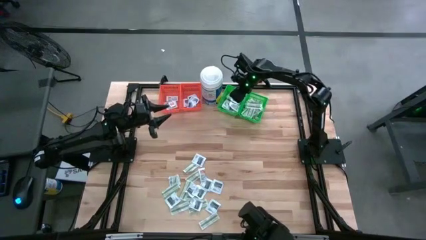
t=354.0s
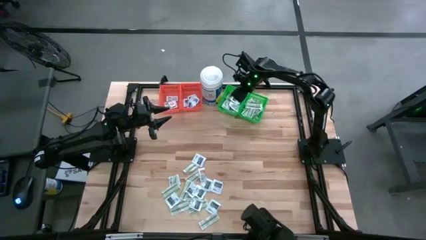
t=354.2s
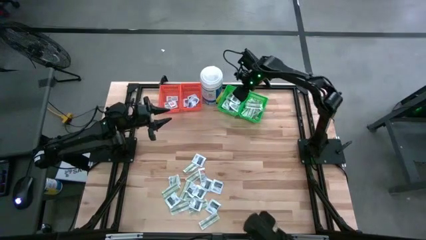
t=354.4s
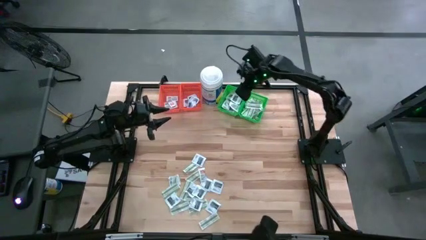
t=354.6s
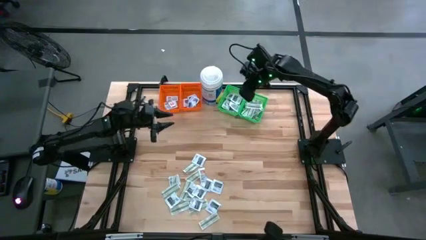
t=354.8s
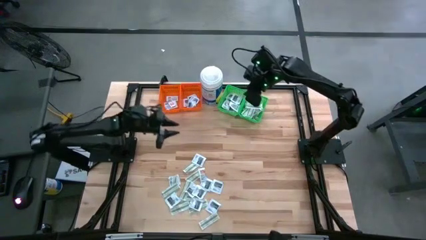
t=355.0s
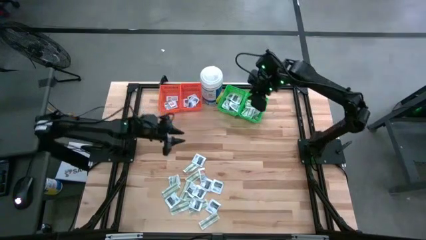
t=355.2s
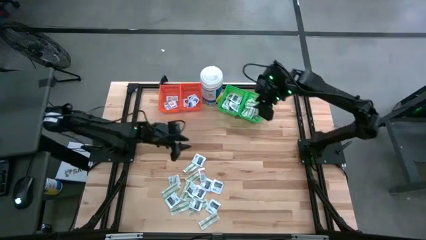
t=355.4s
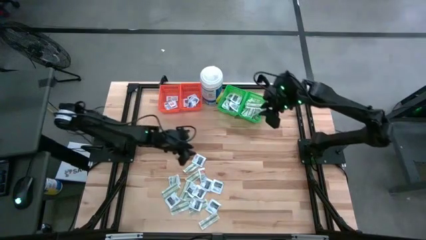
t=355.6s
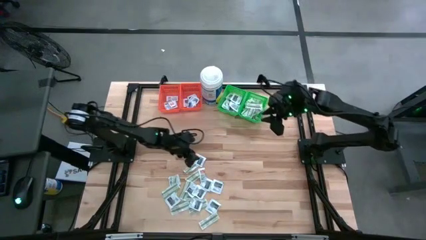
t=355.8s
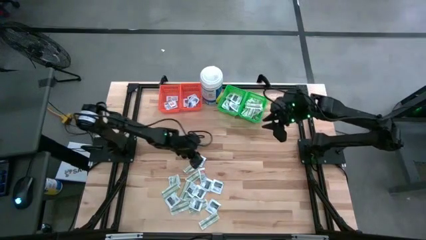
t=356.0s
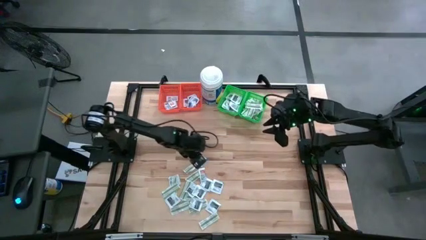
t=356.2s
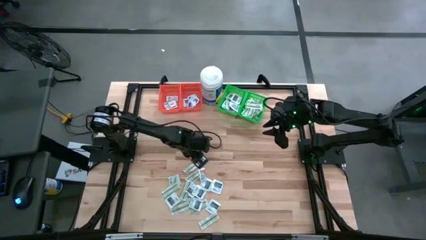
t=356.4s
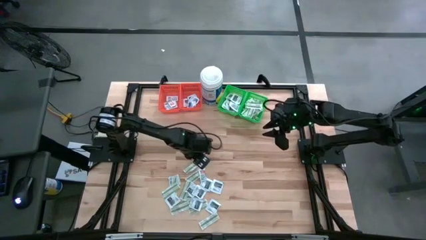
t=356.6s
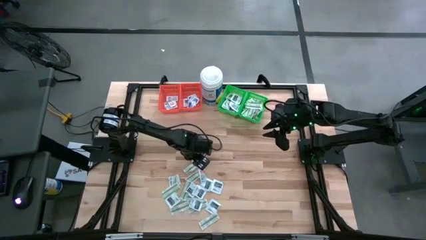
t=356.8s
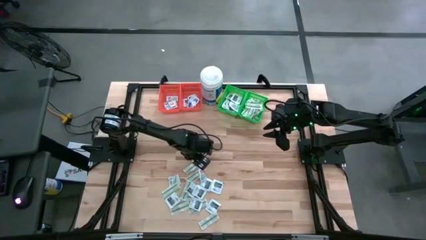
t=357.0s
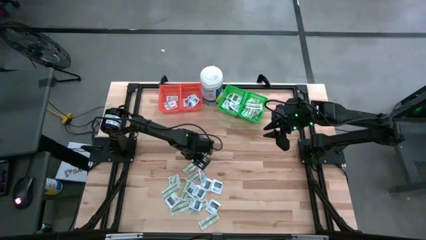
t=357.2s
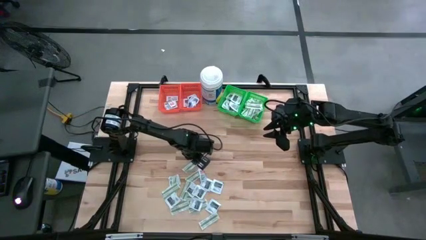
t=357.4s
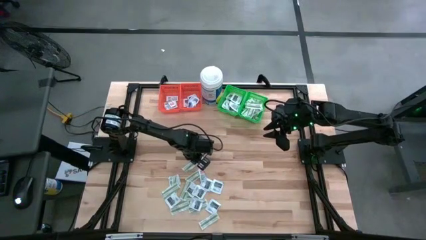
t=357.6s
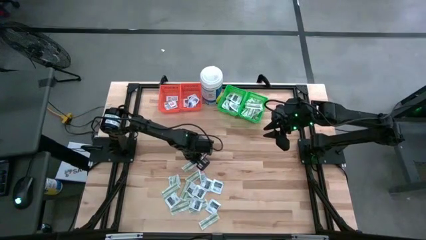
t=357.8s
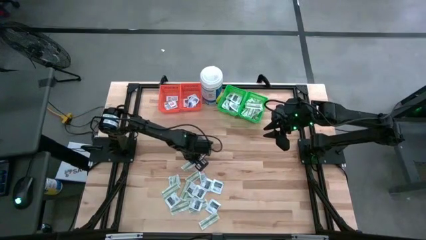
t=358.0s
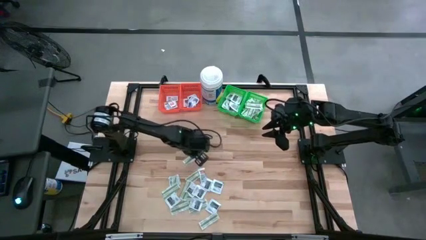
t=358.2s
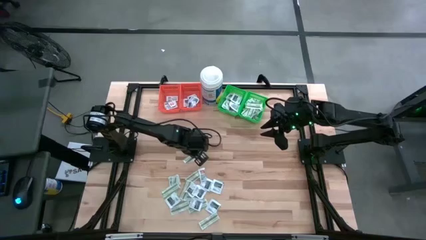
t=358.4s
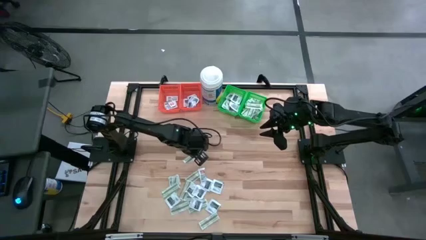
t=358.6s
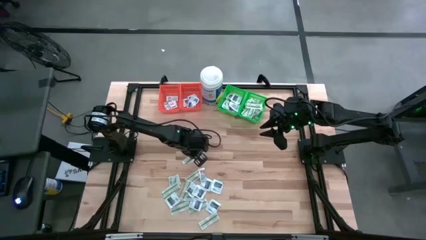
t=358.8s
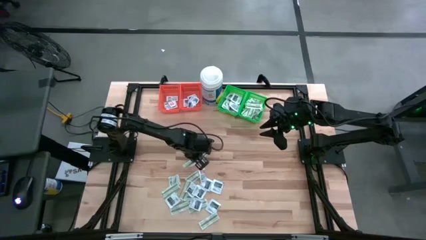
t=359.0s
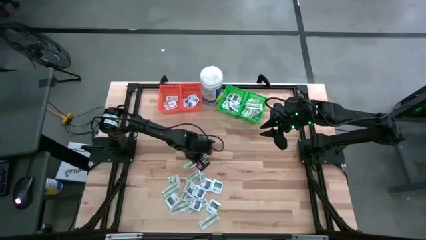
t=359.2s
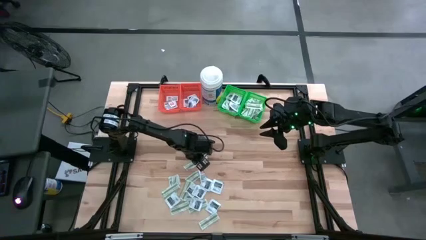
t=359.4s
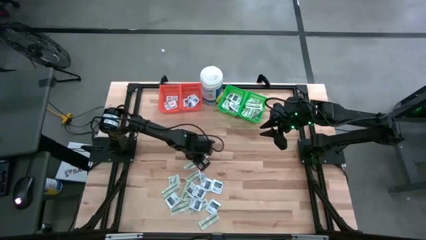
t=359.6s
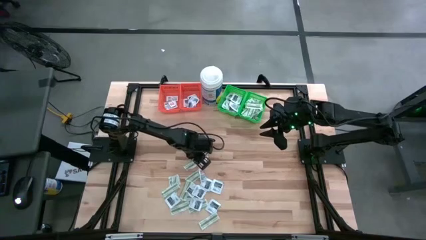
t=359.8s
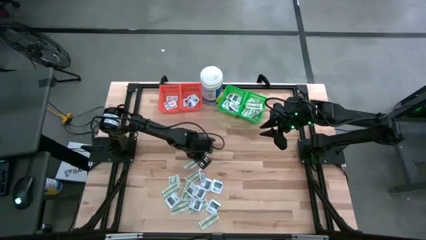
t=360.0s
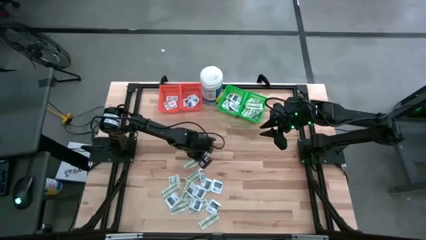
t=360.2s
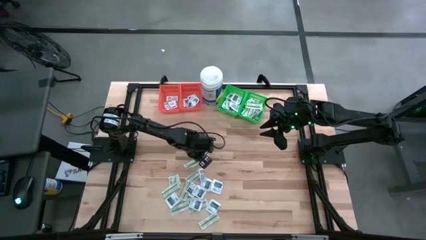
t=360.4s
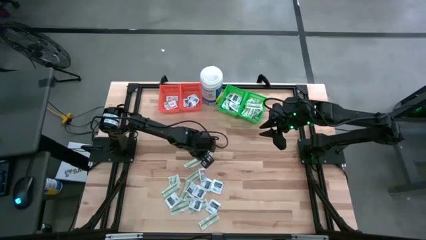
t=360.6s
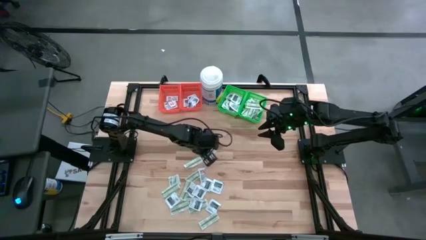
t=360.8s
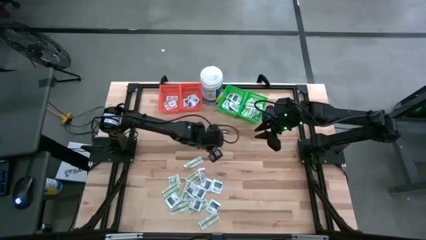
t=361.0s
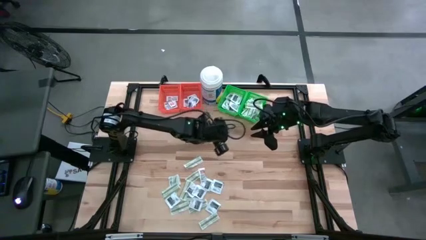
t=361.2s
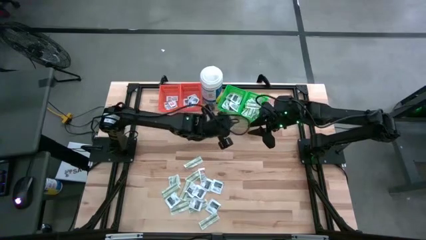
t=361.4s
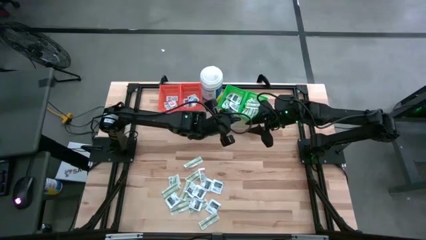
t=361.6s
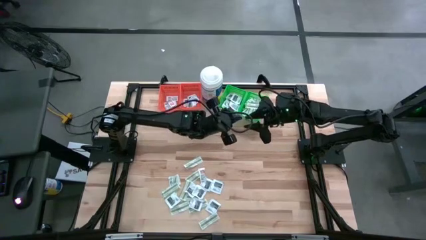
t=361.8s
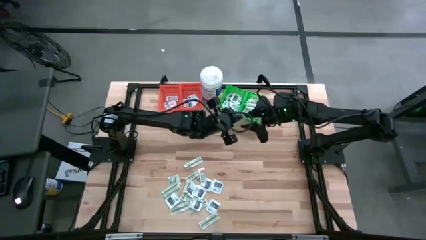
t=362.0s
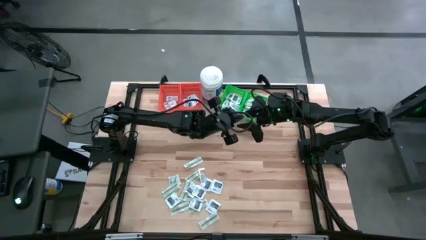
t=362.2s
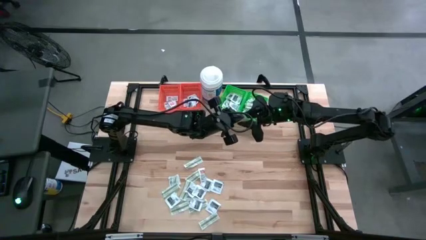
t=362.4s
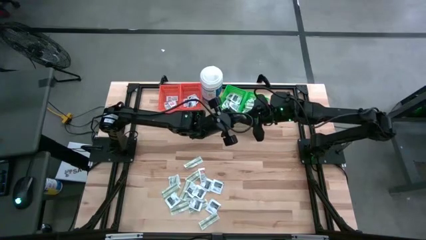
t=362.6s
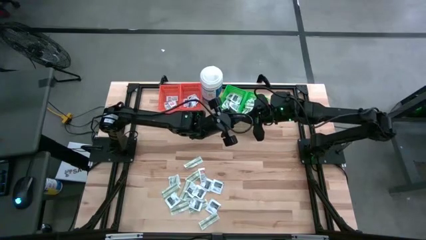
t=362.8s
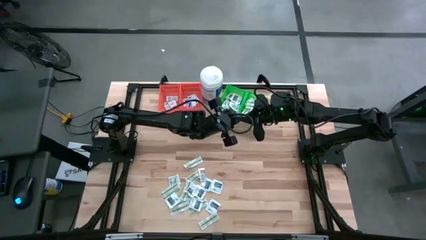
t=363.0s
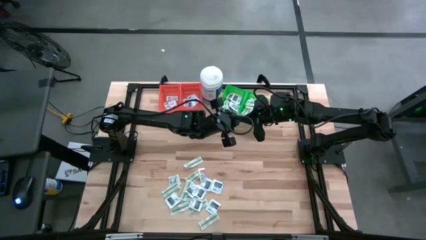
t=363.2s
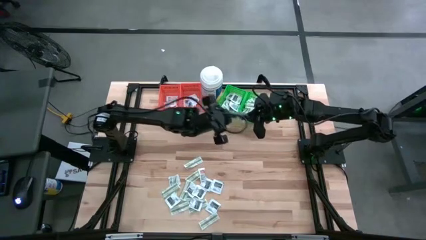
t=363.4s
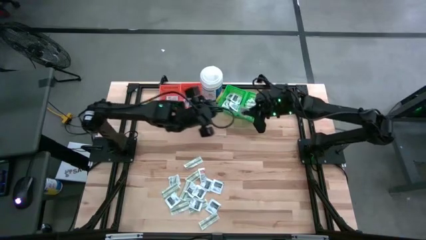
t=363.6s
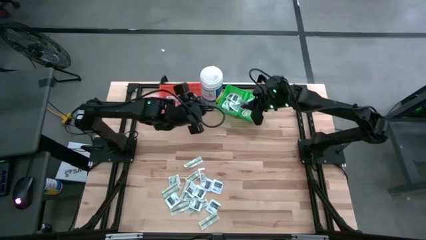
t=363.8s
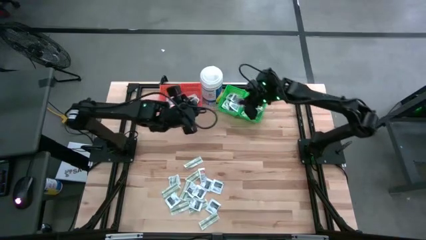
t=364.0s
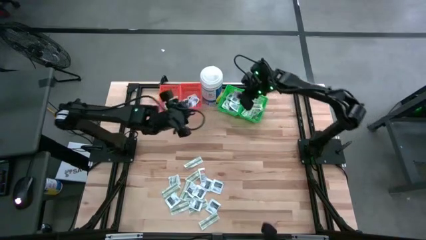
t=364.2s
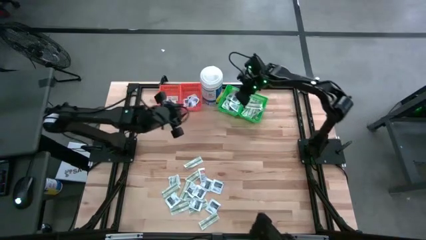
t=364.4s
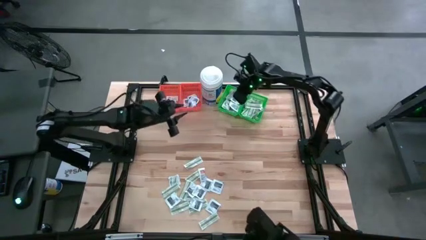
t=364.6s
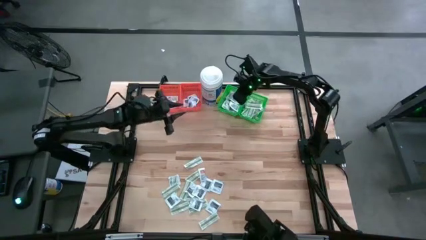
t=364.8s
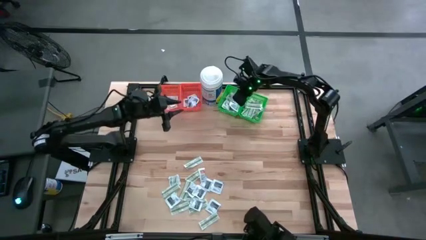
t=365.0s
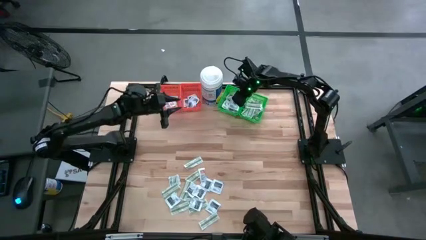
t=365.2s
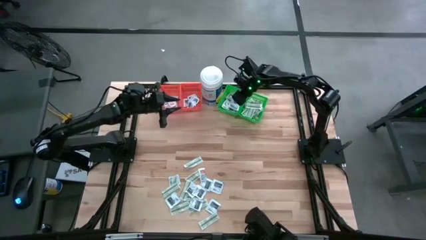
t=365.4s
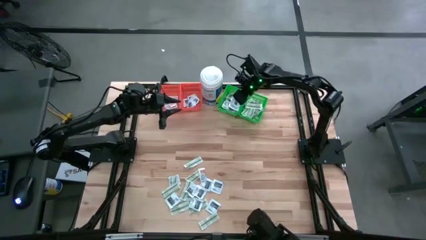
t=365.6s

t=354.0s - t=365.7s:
Task: Pick & Place First Aid Supplies
Put the black towelette pack into the left green bin
